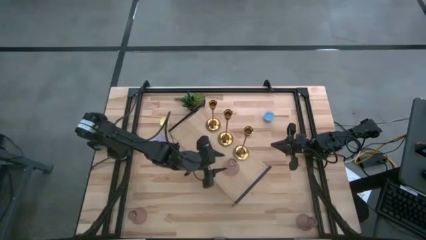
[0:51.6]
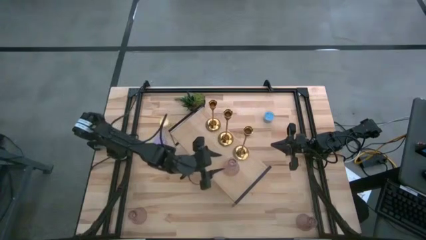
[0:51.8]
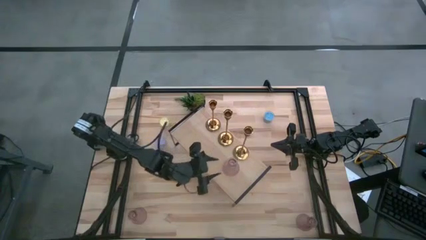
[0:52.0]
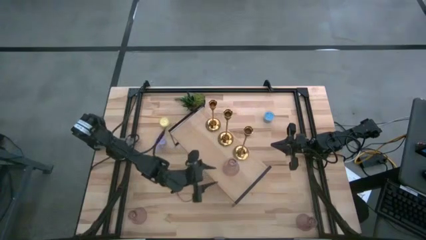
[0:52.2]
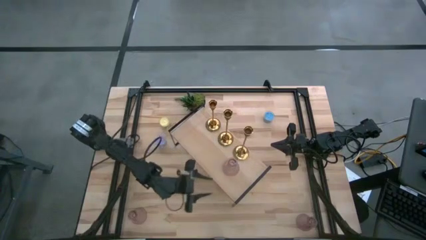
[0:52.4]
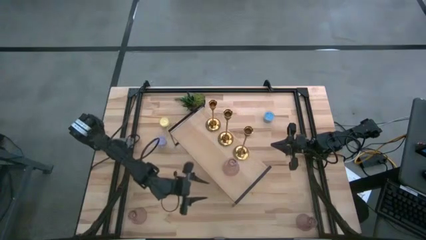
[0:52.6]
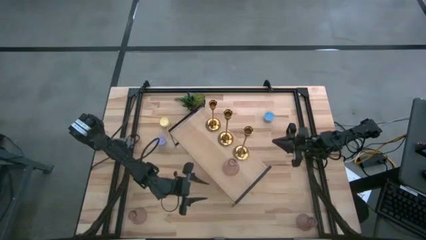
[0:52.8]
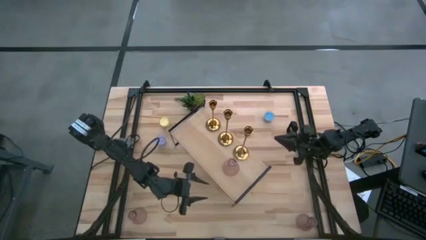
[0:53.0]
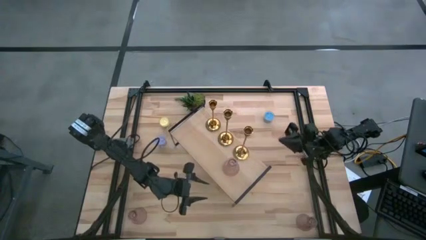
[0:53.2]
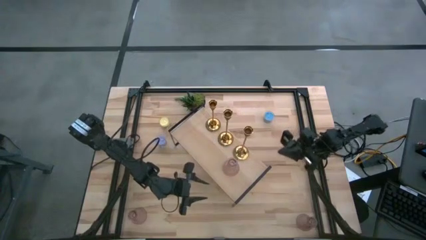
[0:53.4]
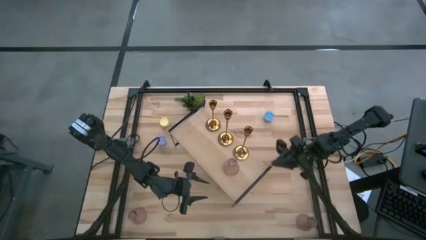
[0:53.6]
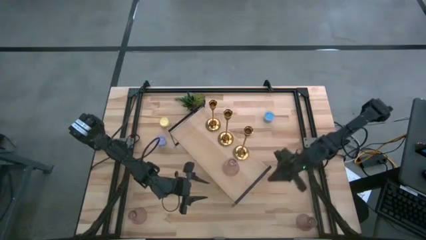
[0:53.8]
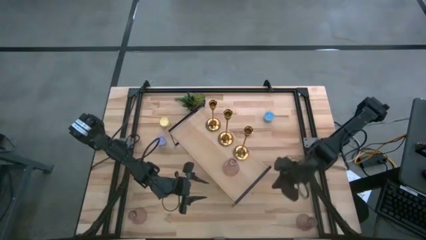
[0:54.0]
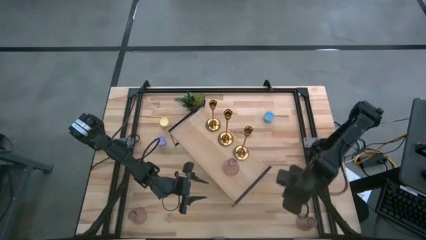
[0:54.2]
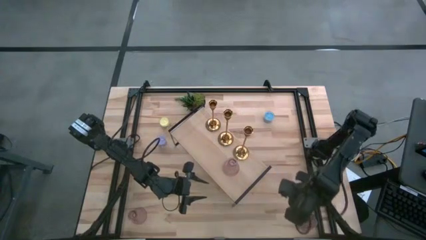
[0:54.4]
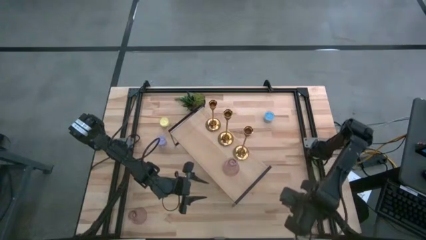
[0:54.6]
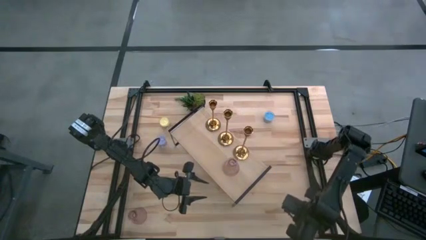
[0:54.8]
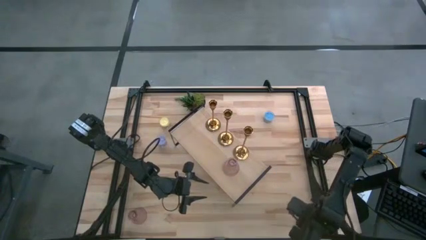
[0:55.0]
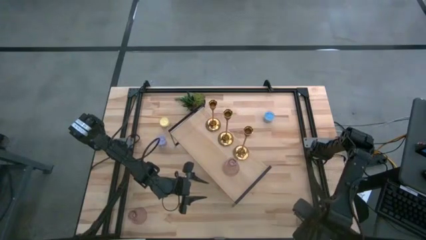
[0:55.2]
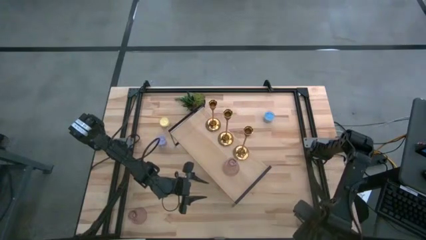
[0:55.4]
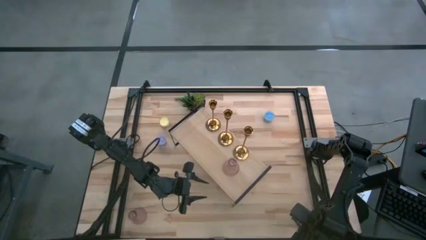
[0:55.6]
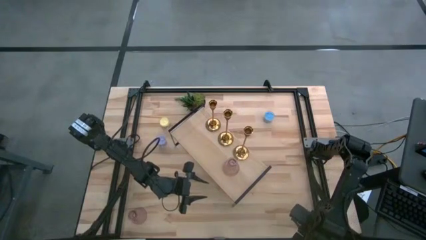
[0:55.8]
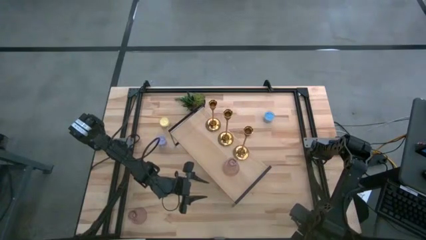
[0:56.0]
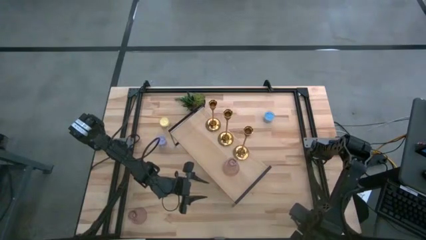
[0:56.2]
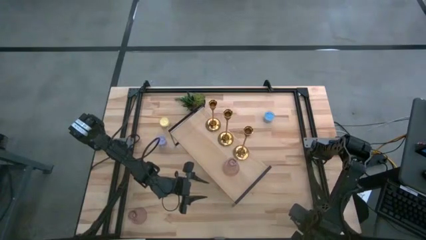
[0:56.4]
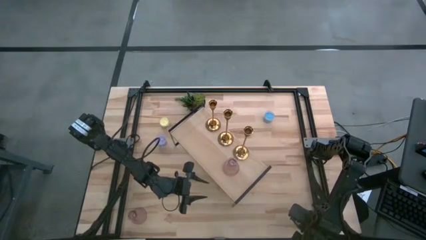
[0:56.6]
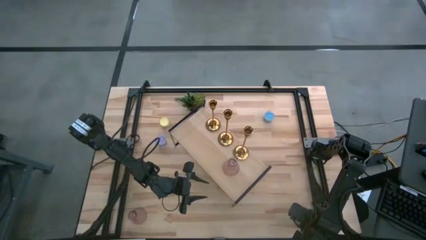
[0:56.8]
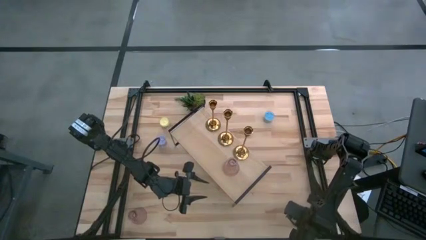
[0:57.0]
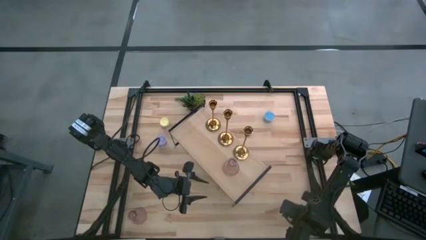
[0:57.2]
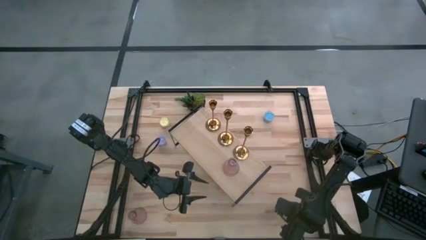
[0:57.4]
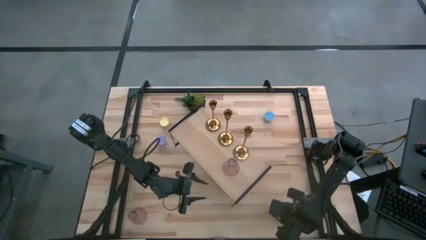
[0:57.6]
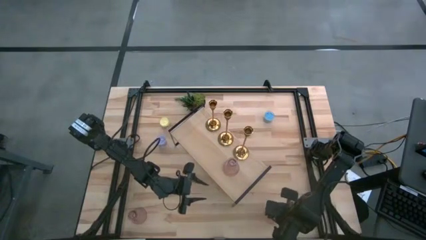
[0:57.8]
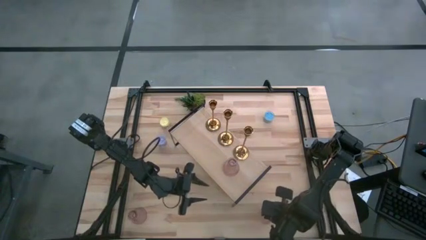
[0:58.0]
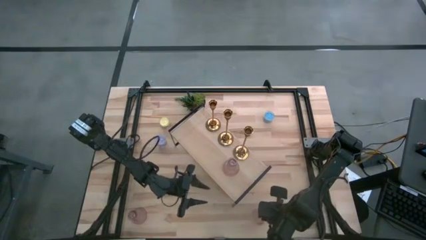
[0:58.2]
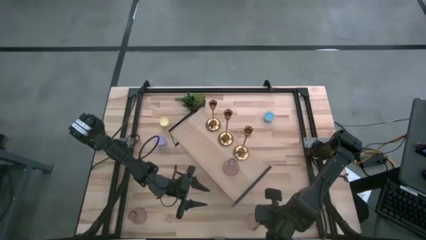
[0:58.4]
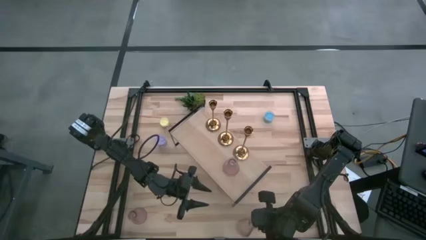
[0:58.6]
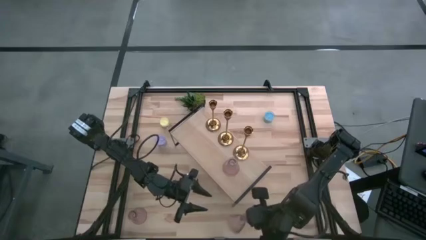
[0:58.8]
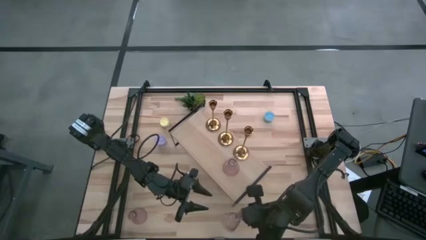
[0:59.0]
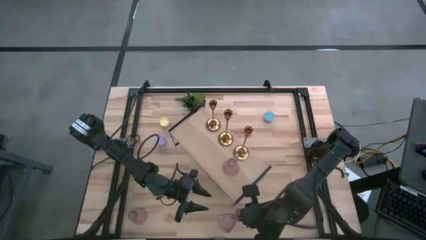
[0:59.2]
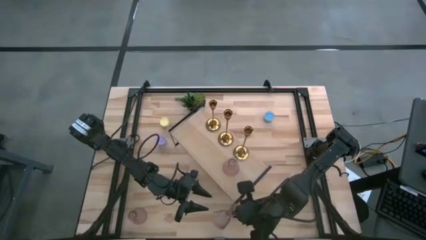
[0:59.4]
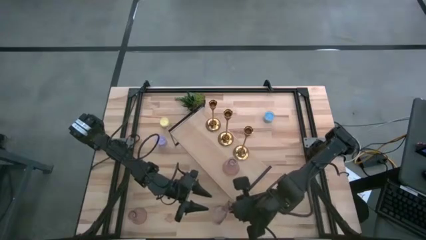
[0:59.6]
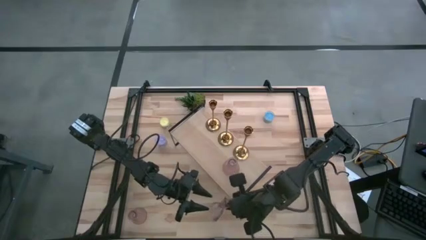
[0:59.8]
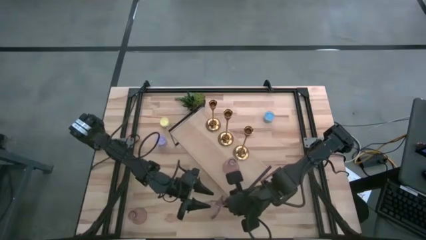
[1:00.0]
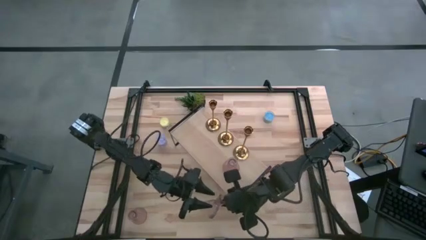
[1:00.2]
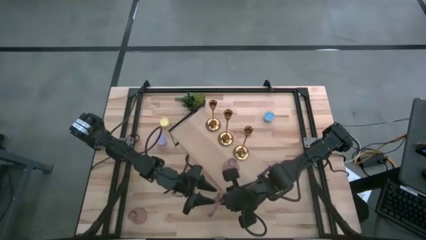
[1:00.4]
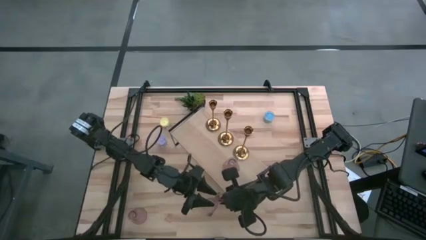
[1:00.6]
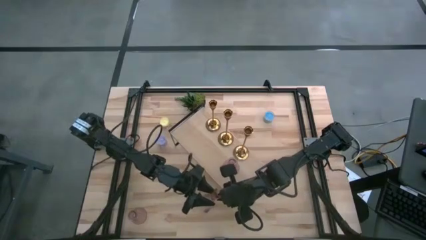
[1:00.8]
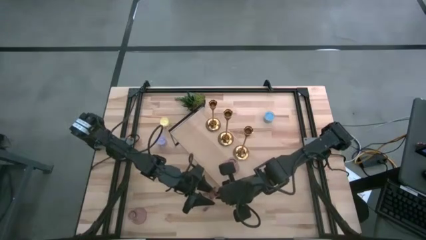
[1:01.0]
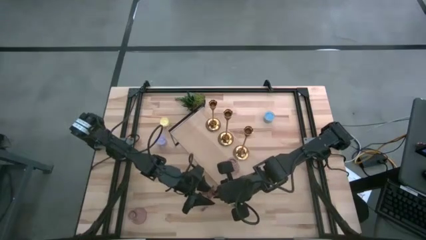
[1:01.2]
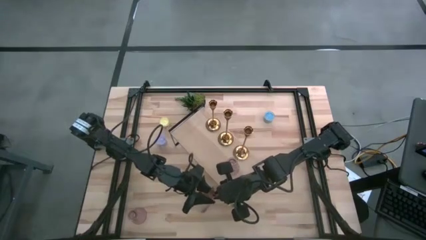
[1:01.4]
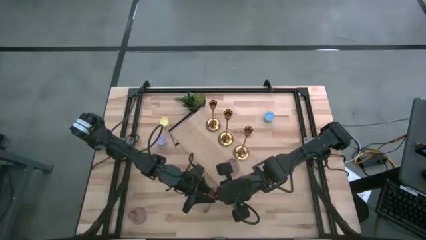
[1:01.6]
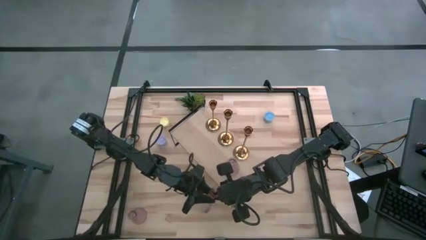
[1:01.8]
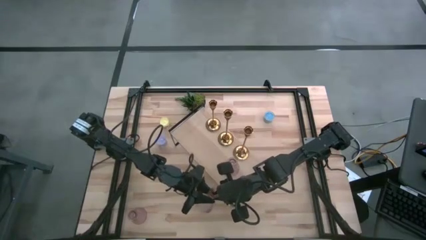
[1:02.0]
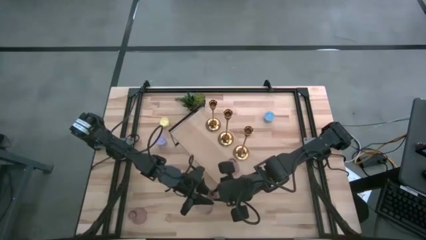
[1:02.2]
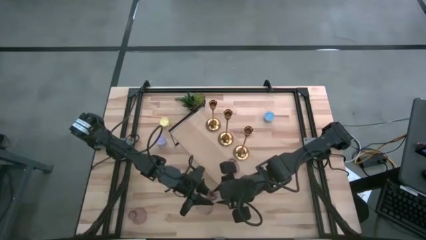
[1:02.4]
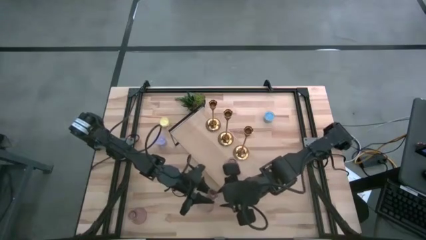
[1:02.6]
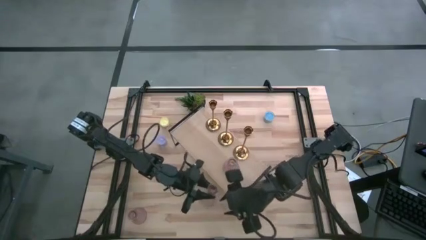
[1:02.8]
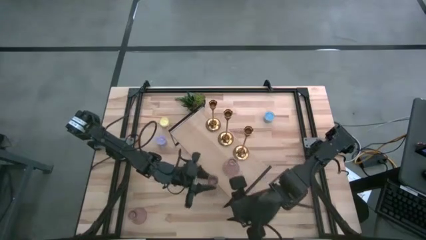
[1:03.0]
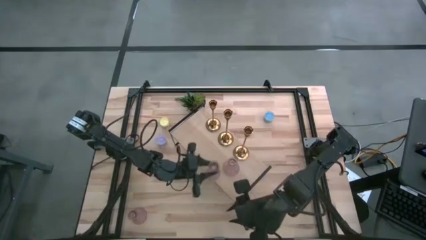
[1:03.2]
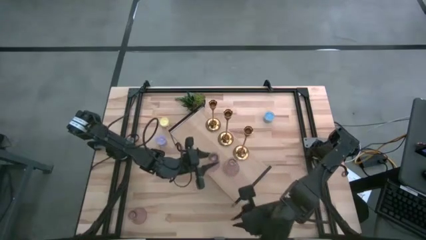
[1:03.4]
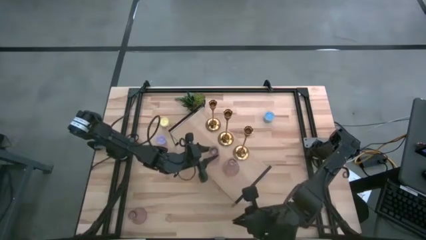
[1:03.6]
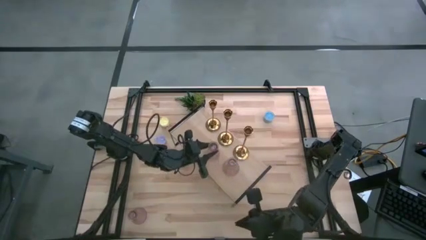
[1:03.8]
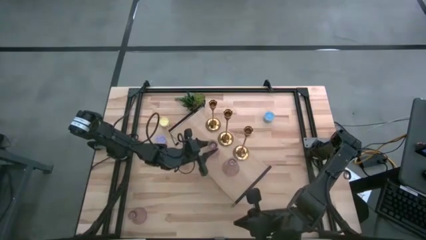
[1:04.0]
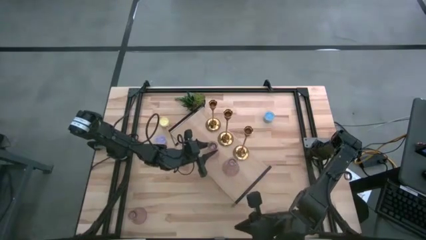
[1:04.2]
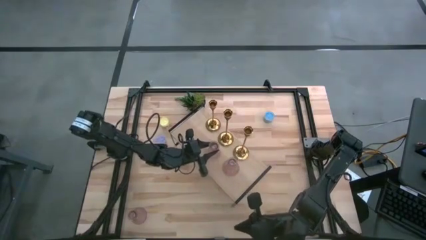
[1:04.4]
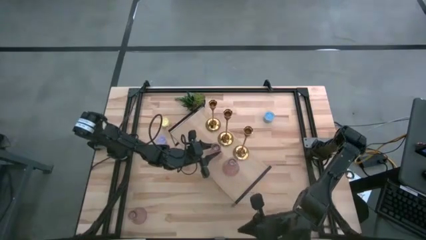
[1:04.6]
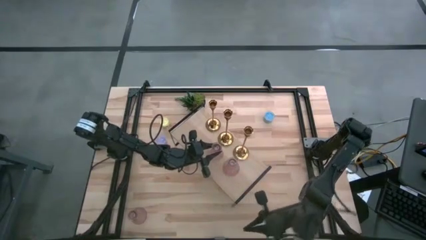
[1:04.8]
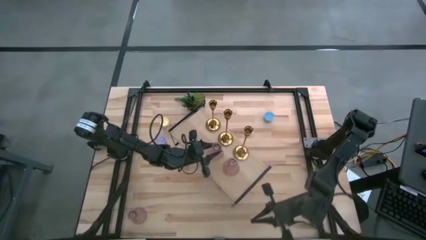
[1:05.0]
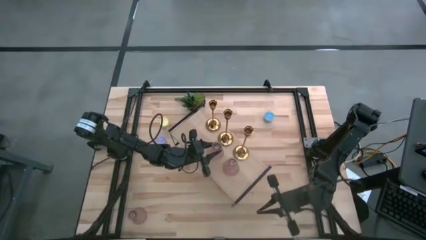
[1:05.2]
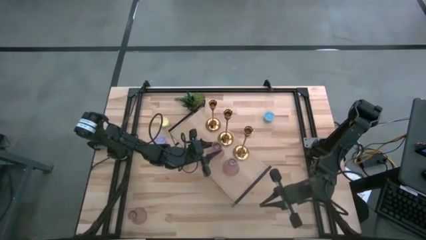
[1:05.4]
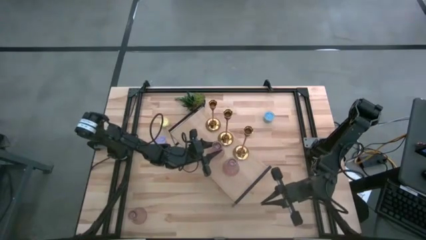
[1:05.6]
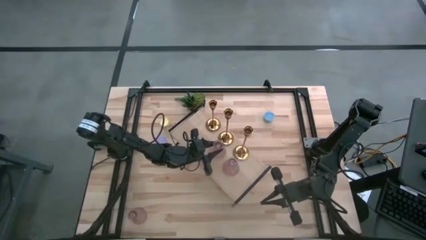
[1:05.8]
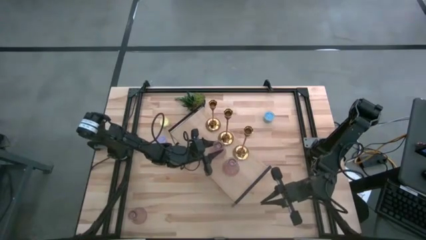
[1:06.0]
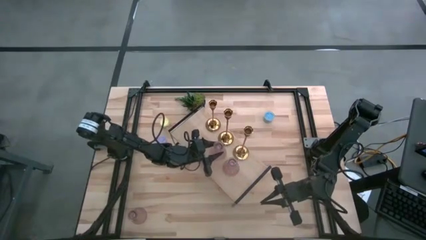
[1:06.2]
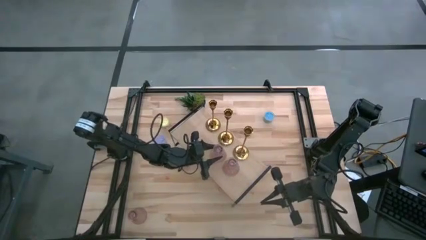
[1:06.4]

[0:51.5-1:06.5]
Task: Pick & Place candle stick holders
Put the right pink glass candle holder on the shelf aligned with the other pink glass candle holder

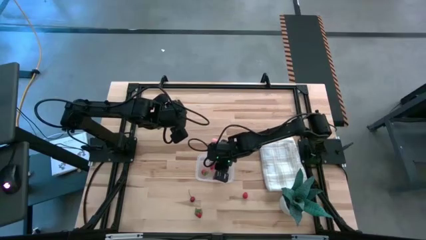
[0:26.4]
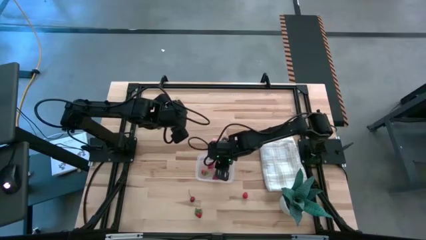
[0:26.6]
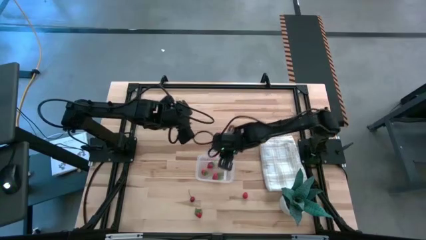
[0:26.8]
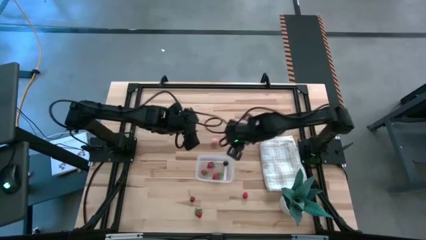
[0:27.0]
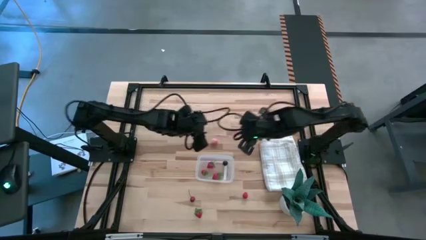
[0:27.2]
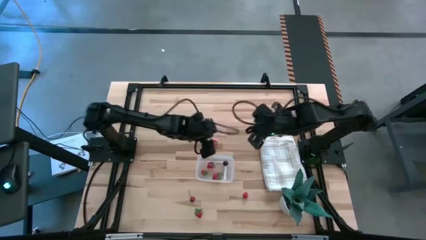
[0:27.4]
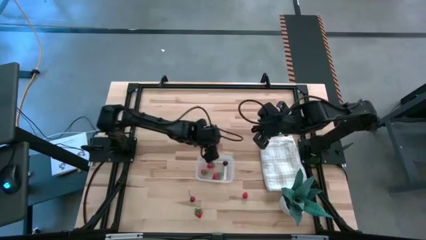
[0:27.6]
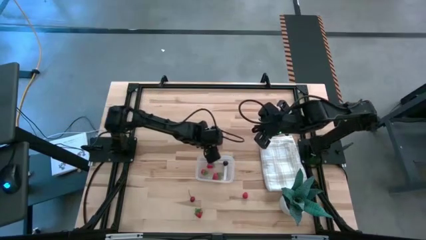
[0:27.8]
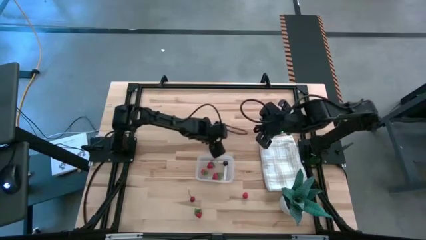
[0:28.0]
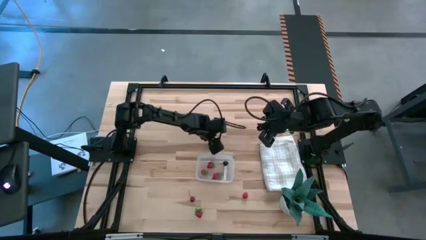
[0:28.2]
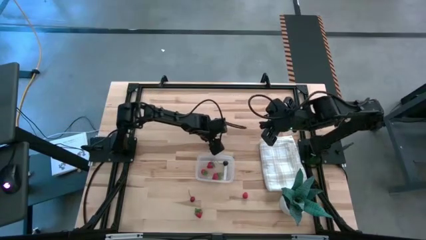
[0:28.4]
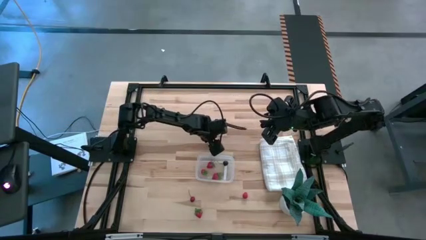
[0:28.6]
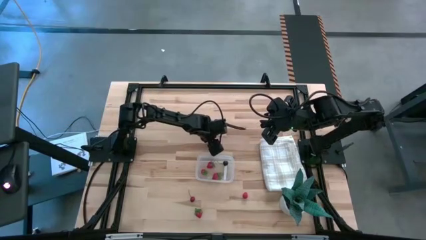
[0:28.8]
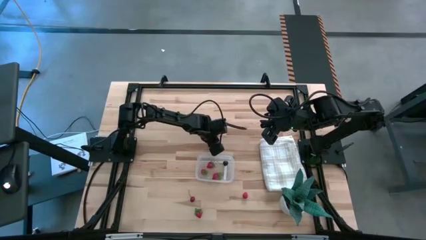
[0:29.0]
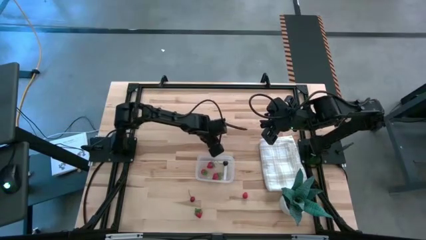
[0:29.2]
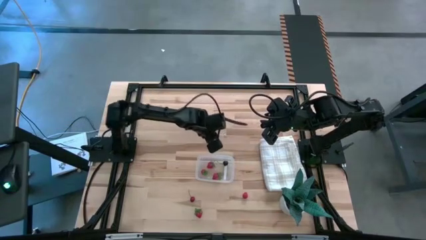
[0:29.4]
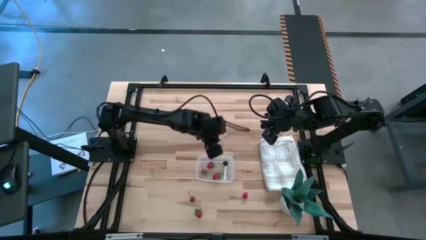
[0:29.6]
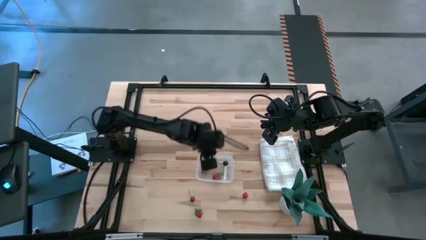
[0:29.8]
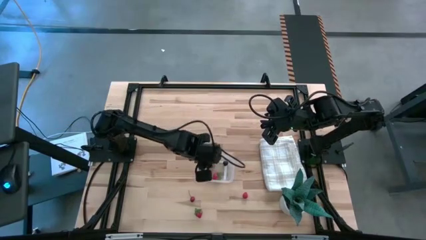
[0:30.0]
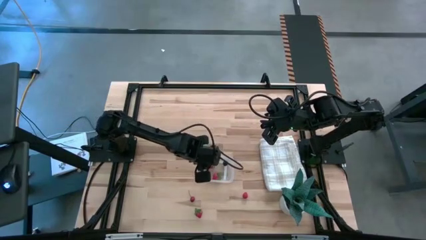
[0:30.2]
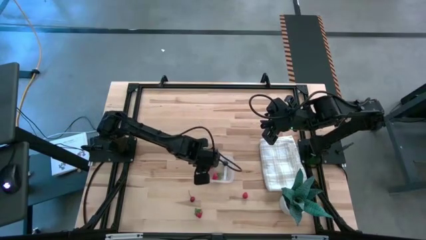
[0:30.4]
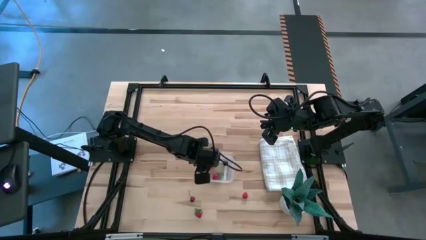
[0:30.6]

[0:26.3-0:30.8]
Task: Pick and placing Produce into tupperware
Put the pink peach into the bin
